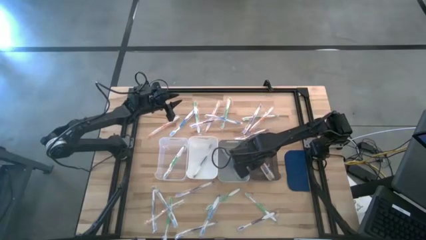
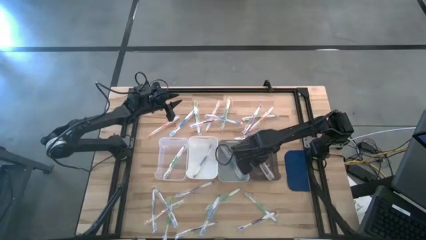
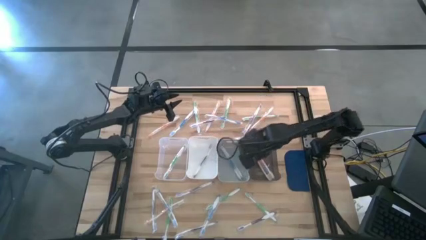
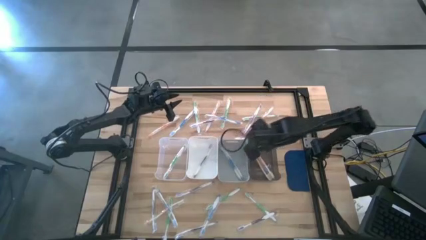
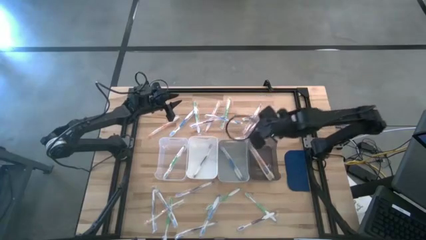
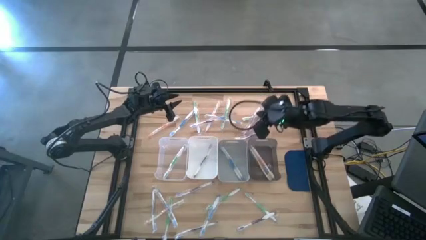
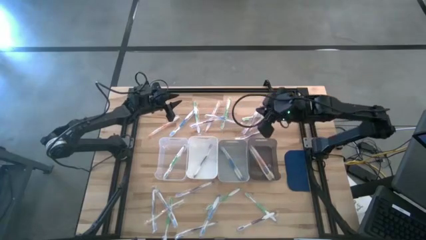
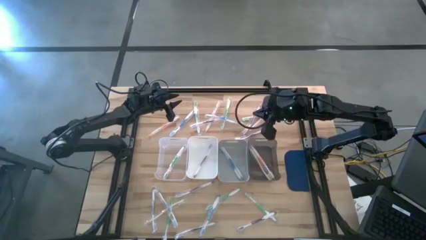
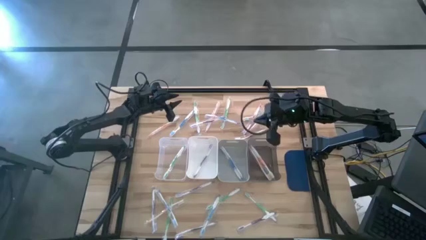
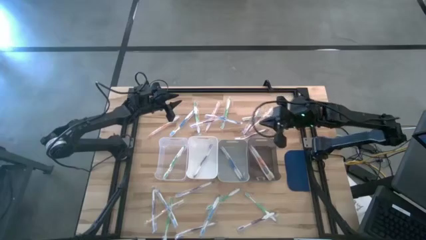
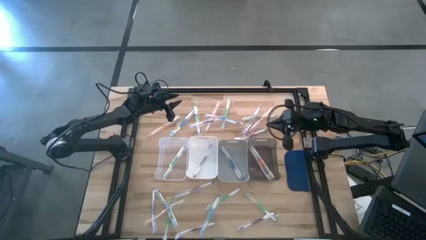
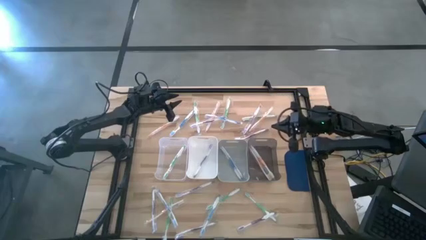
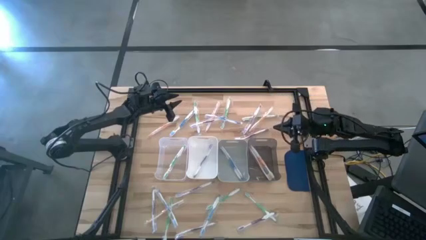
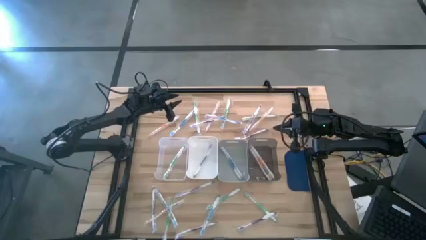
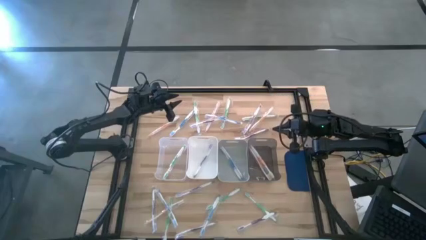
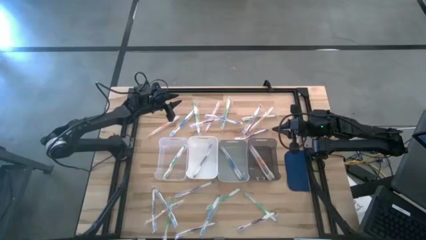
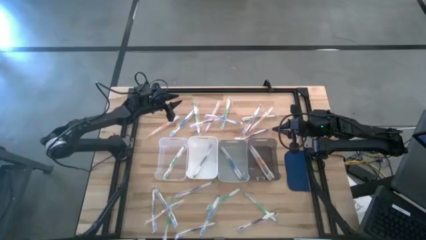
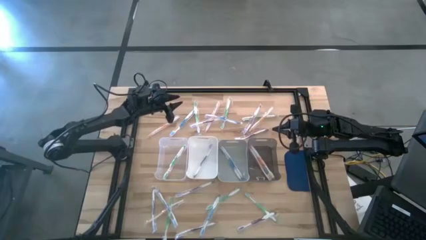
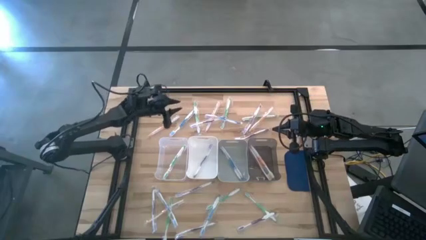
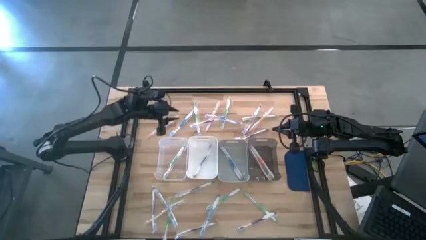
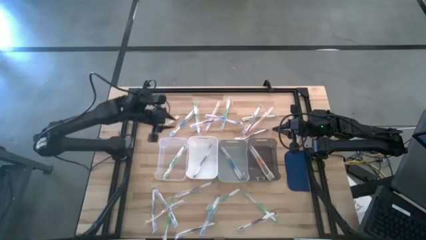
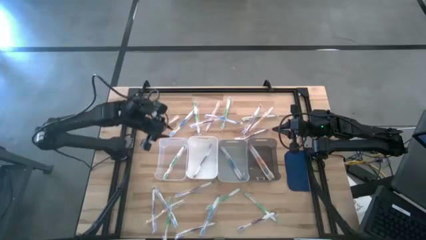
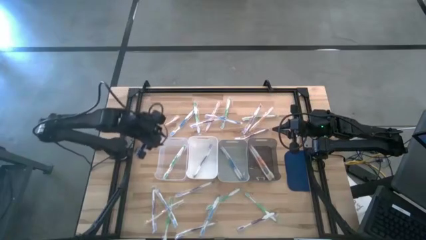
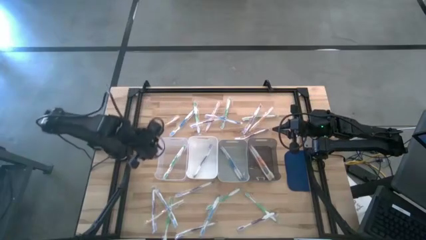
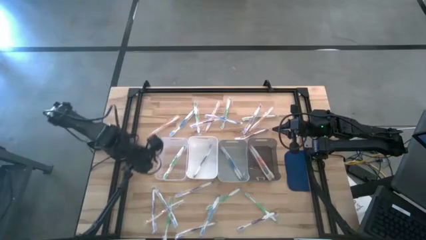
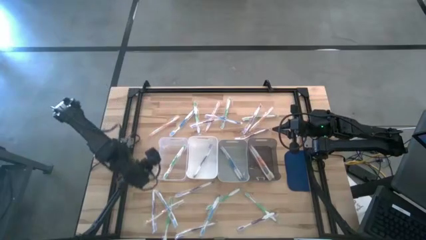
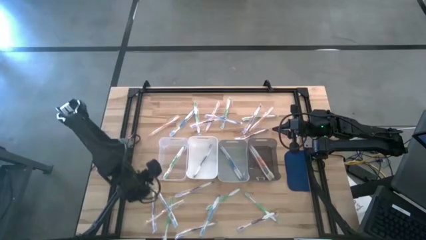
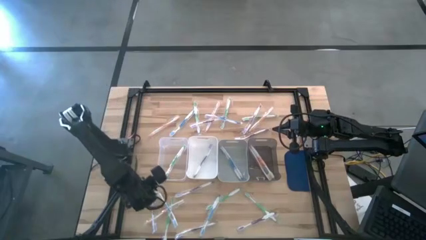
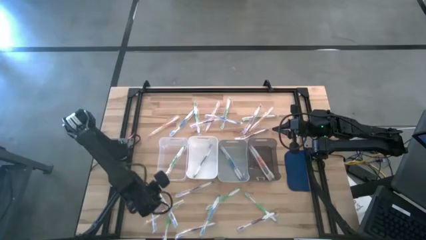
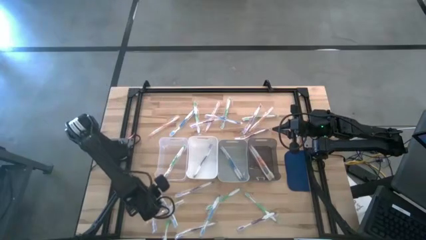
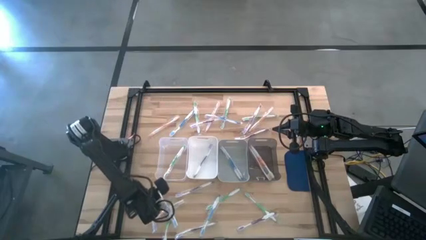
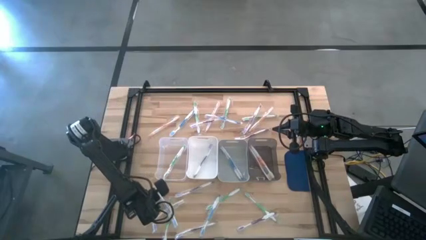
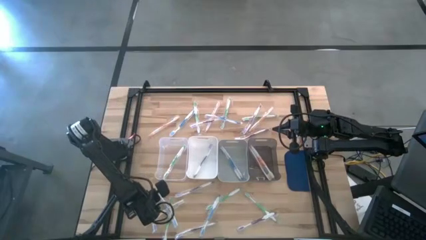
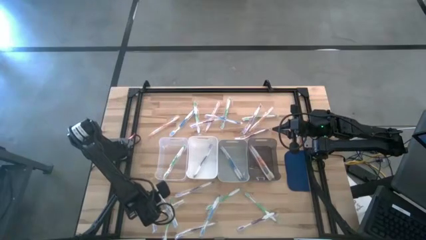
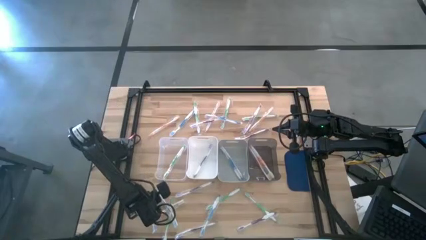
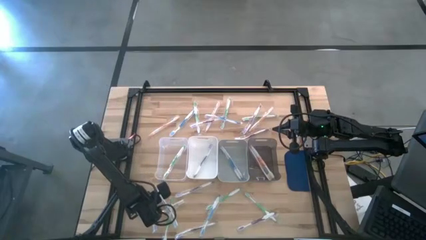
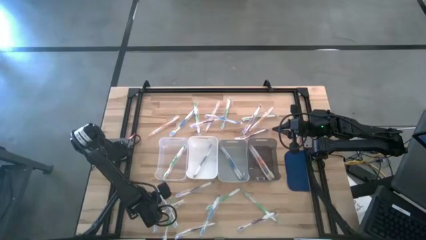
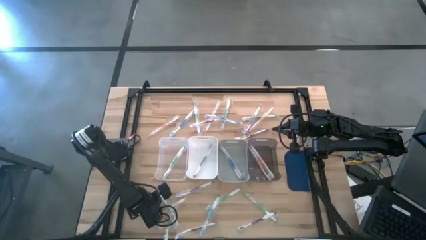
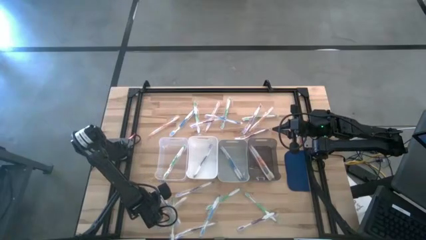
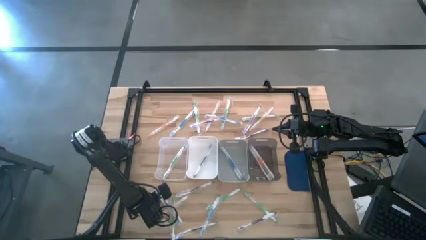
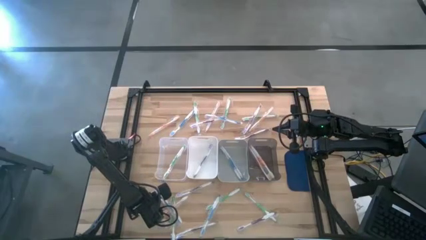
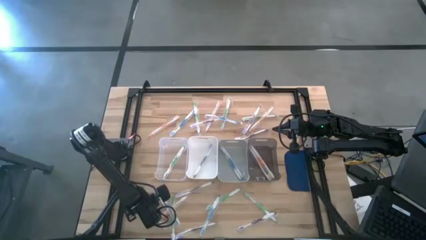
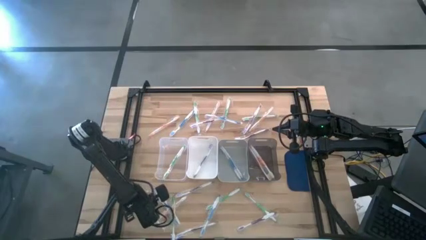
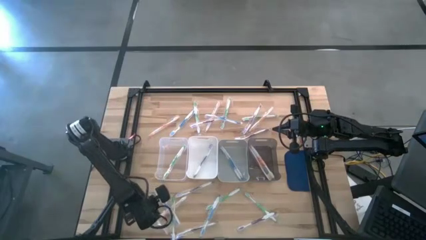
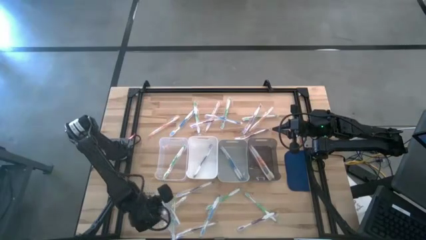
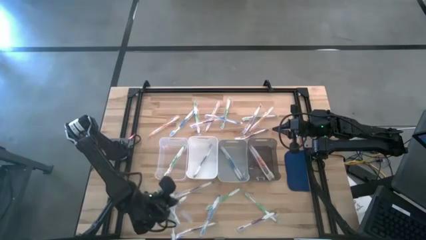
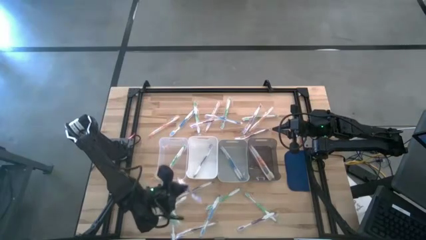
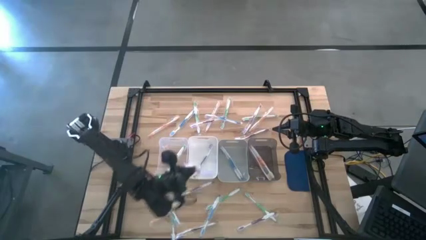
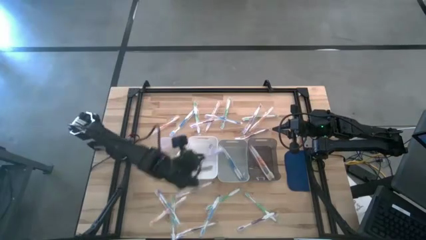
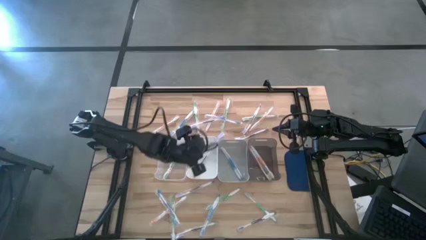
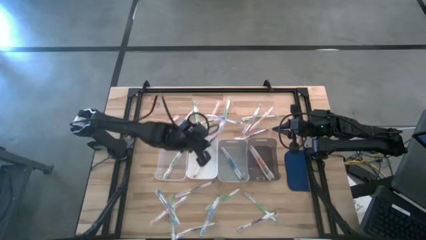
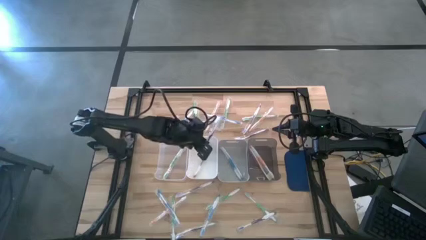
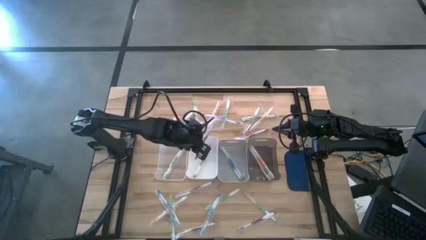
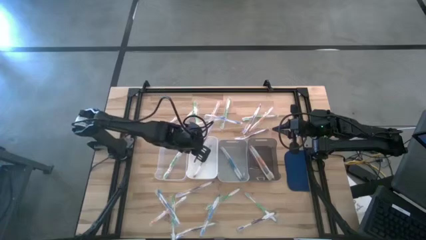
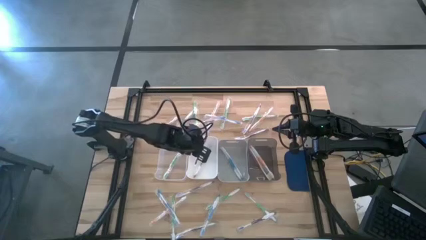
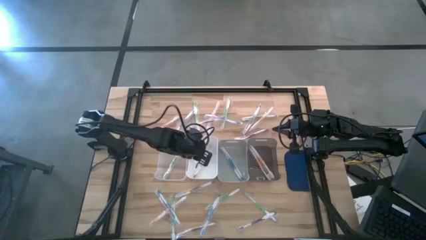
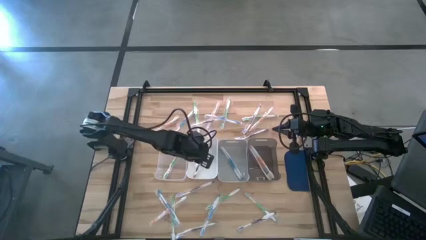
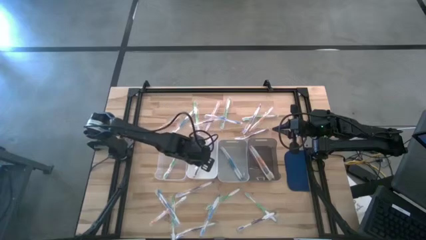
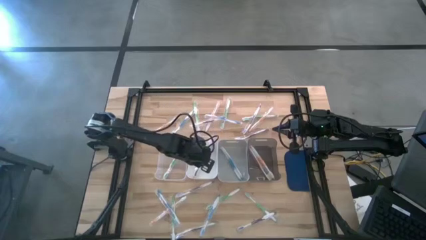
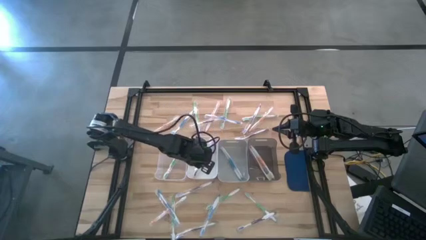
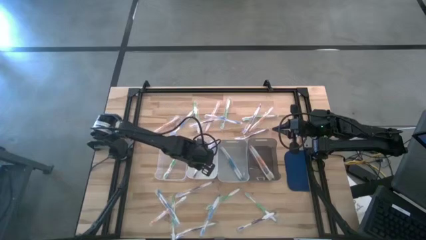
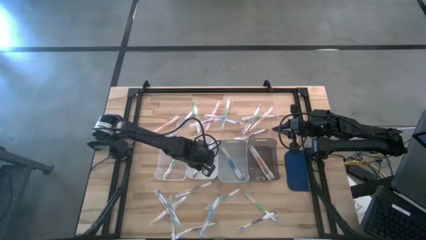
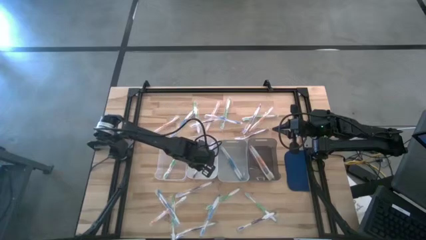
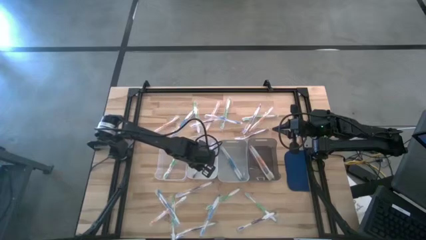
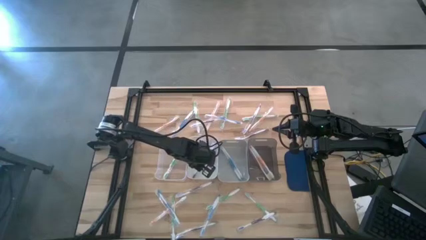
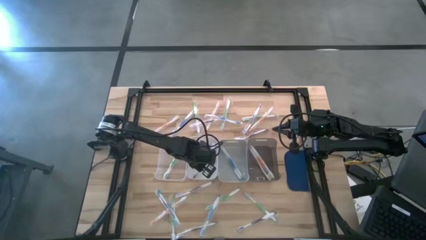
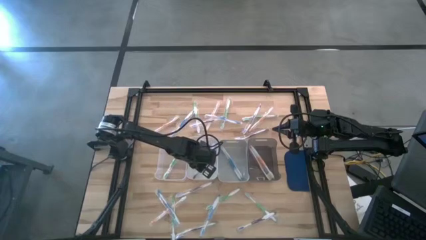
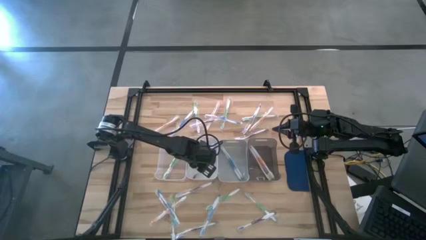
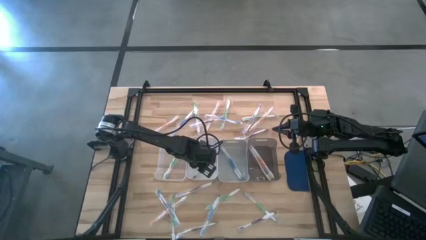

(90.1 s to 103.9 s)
Task: Pick & Place Toothbrushes
Put the purple toothbrush into the white bin
